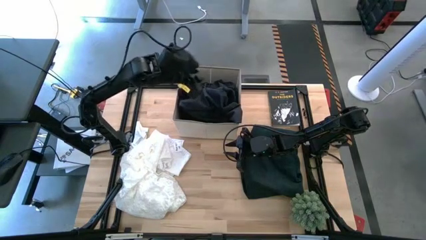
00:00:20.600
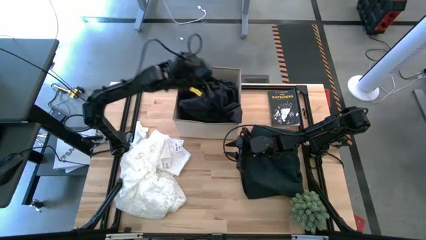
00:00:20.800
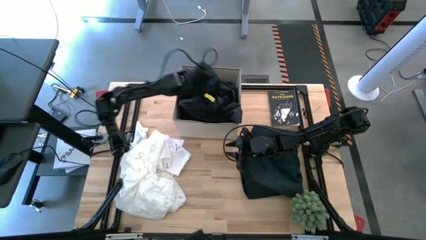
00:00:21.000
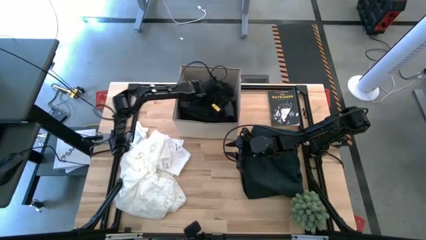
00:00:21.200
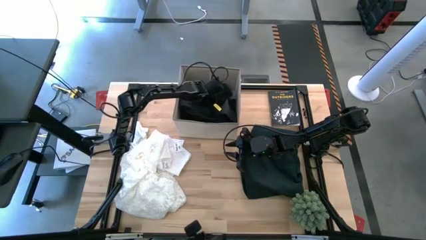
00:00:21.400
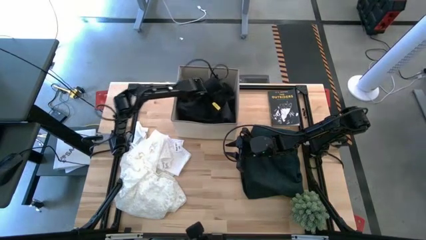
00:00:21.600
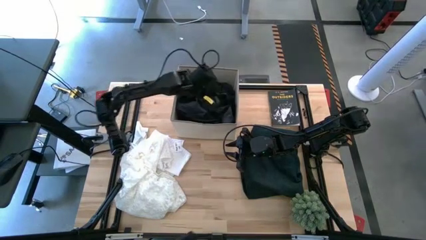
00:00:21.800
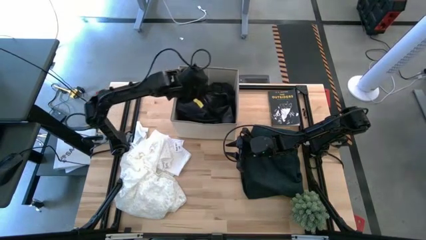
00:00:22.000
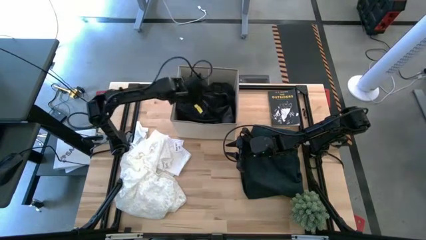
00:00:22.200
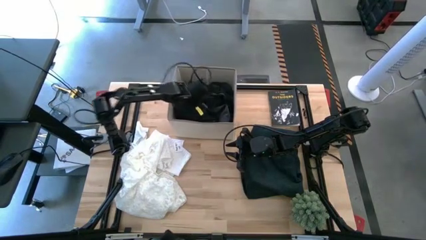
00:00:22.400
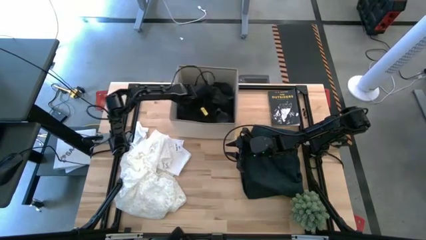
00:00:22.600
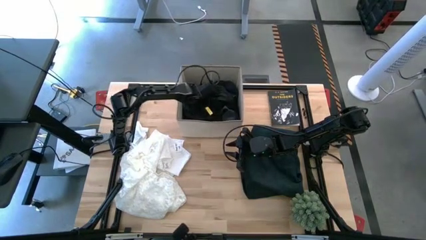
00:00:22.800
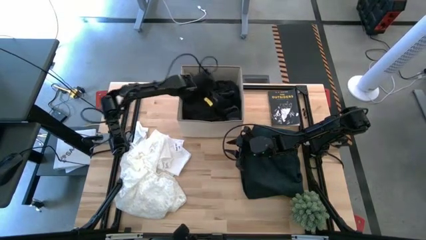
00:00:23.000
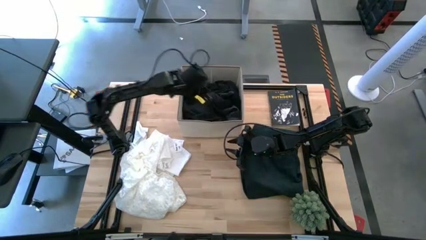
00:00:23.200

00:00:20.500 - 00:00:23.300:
Task: Sort clothes
Adjust the black pants in the laundry organizer

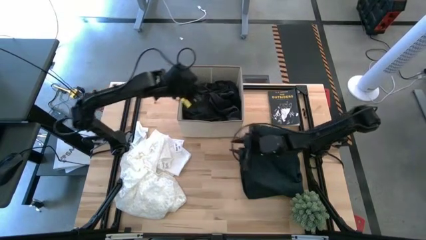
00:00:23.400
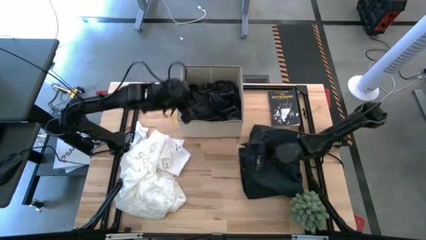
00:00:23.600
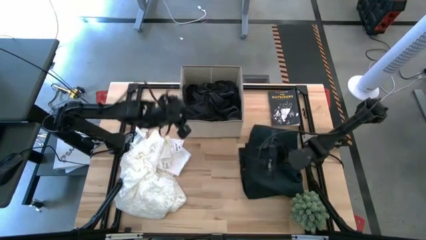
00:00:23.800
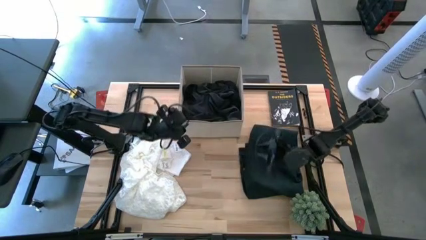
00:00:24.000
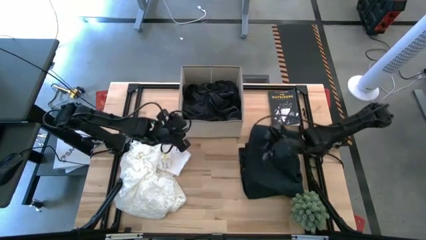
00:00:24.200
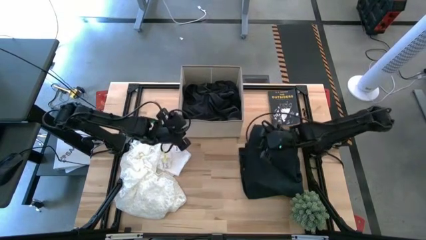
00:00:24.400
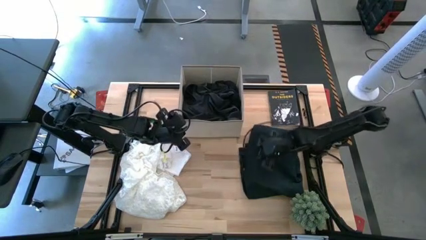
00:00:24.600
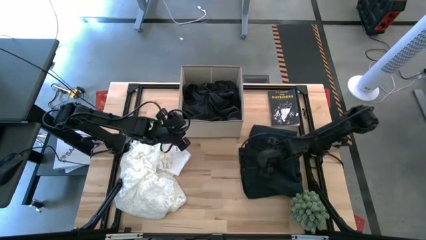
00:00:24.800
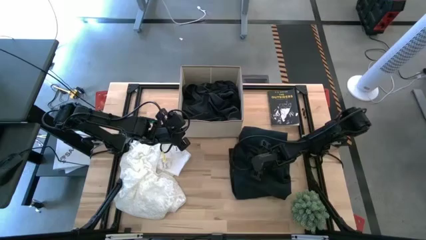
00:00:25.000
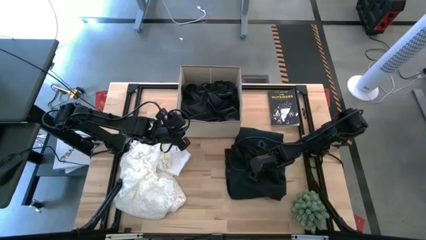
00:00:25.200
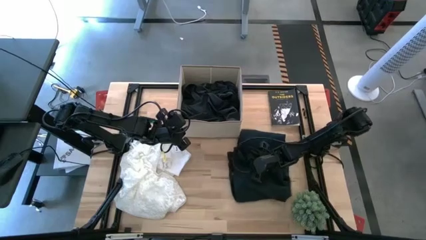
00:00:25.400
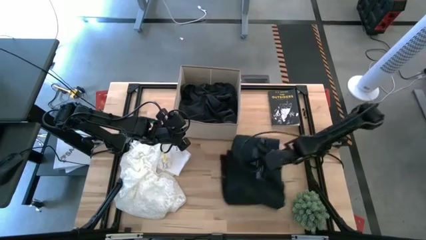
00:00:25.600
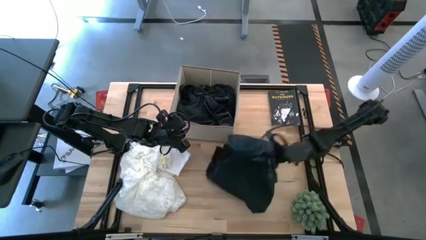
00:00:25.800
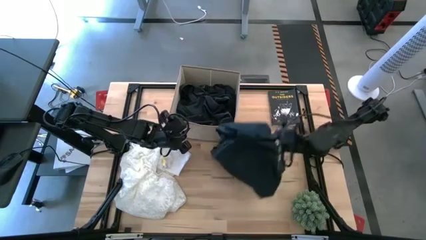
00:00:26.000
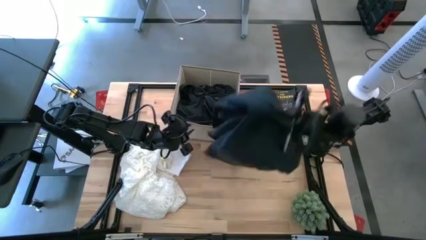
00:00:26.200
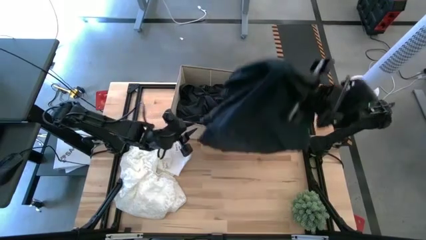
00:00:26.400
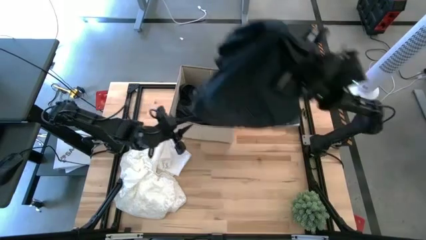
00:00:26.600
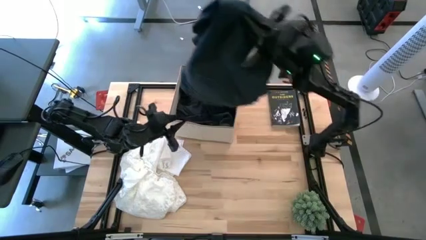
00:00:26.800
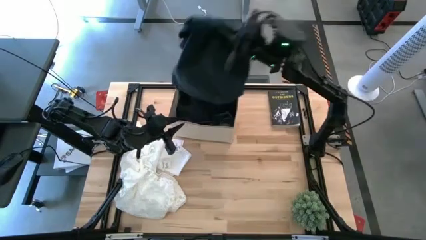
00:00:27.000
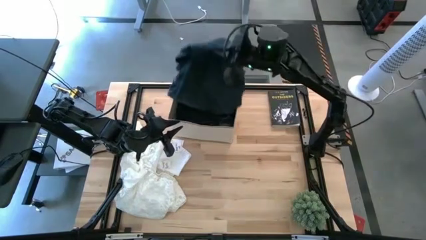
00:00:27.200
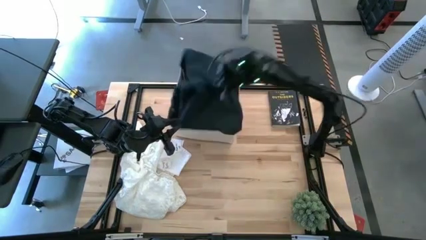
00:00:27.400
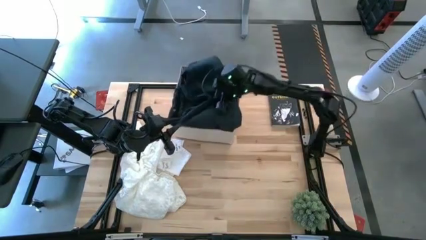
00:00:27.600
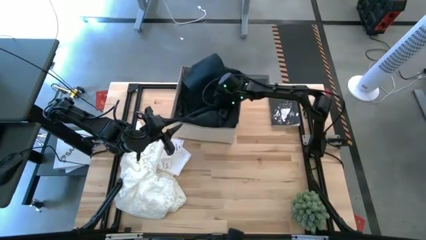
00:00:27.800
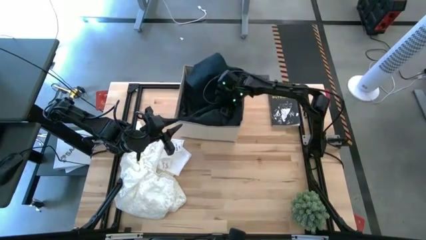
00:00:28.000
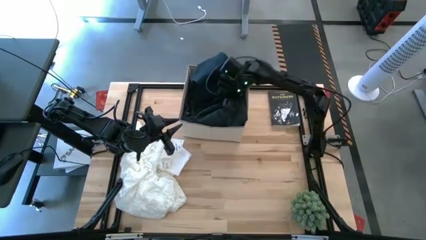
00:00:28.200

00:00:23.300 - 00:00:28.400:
Put the dark blue pants into the laundry organizer

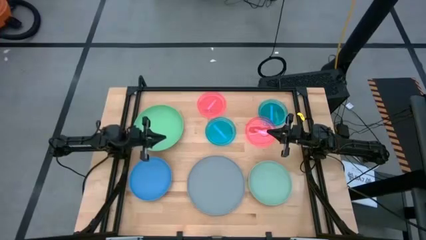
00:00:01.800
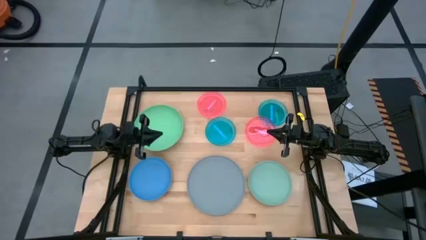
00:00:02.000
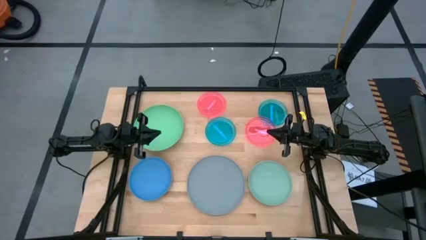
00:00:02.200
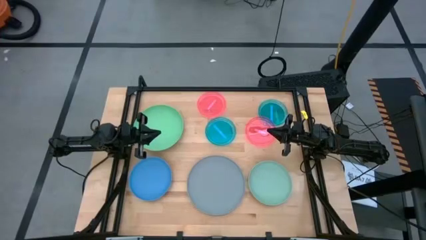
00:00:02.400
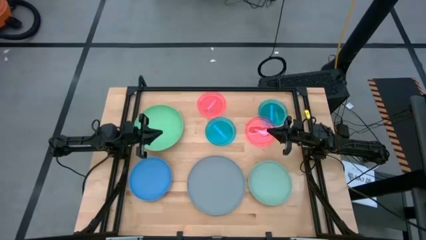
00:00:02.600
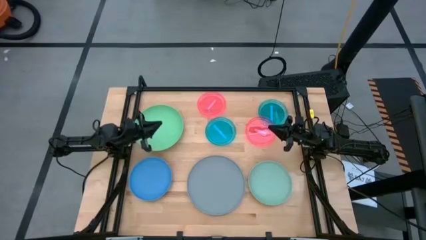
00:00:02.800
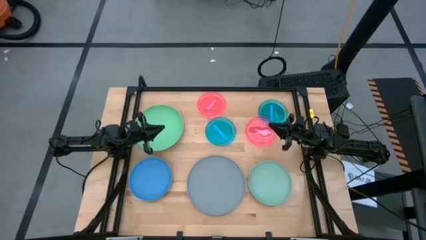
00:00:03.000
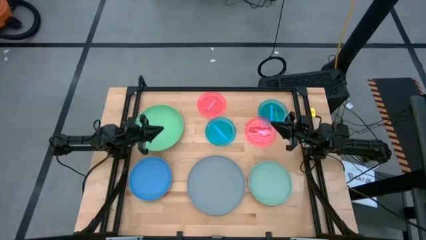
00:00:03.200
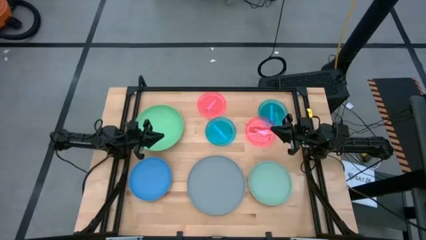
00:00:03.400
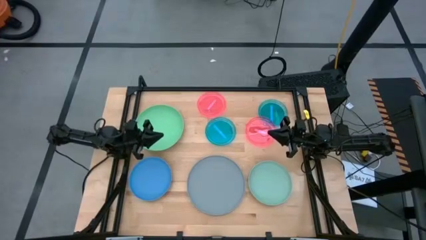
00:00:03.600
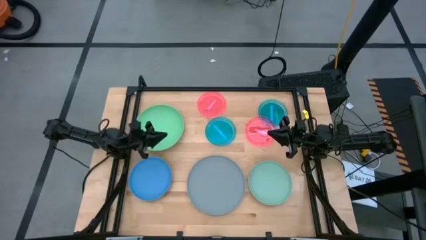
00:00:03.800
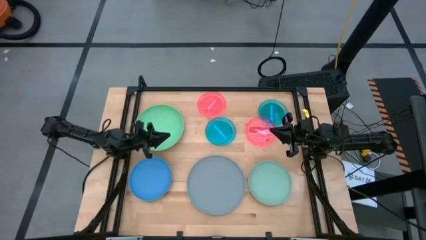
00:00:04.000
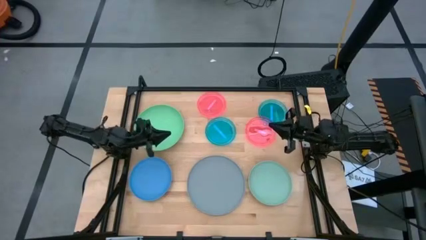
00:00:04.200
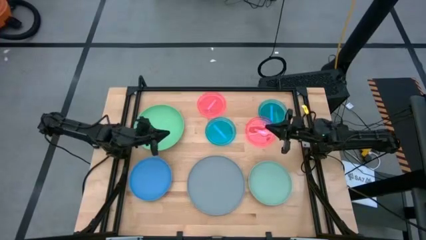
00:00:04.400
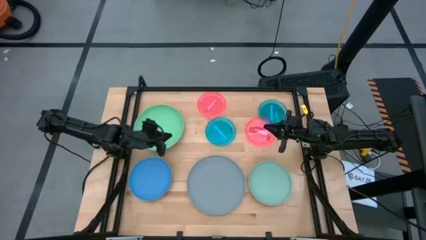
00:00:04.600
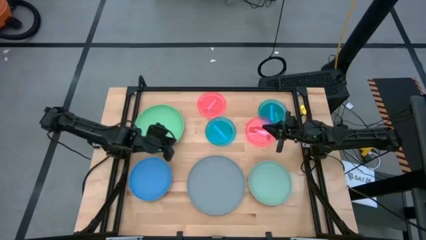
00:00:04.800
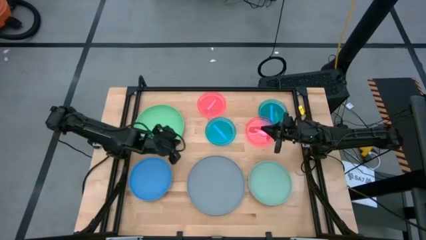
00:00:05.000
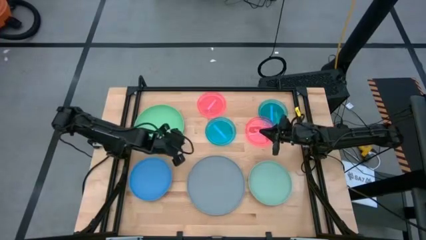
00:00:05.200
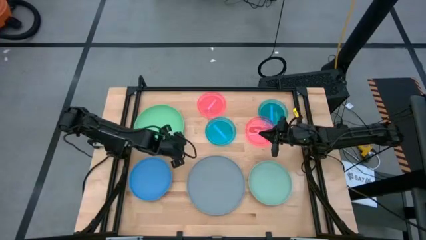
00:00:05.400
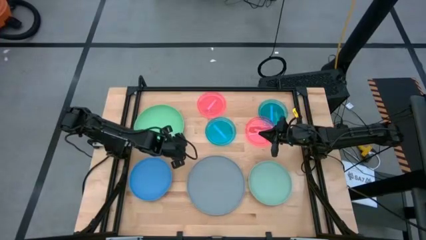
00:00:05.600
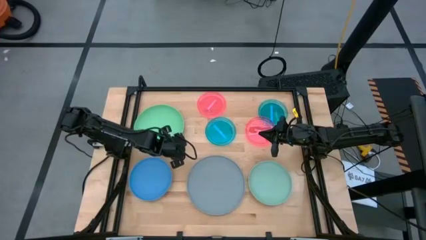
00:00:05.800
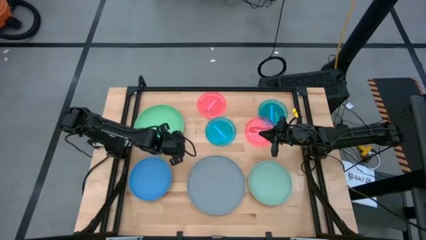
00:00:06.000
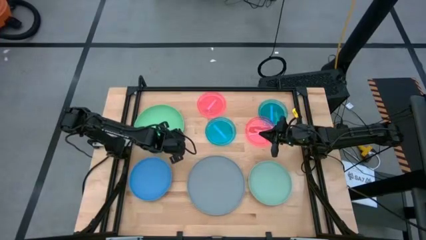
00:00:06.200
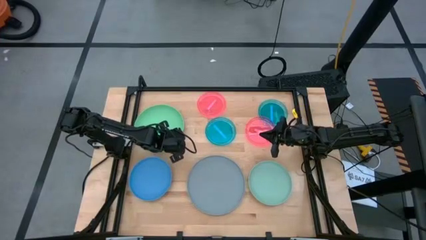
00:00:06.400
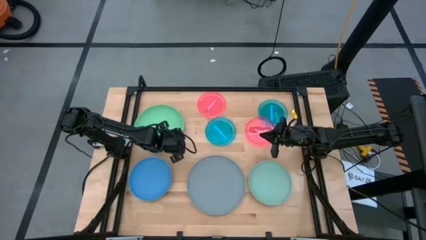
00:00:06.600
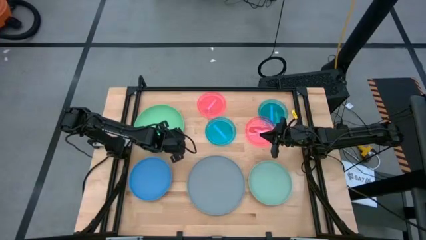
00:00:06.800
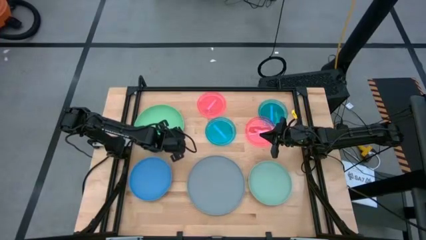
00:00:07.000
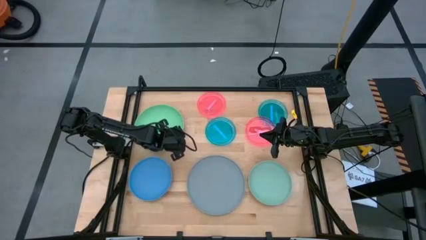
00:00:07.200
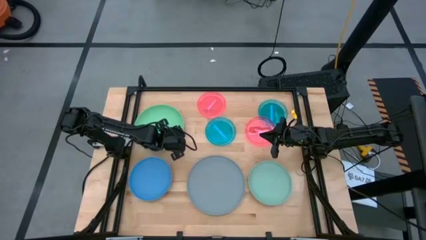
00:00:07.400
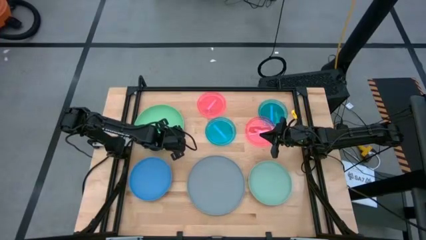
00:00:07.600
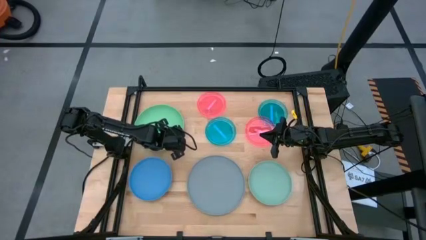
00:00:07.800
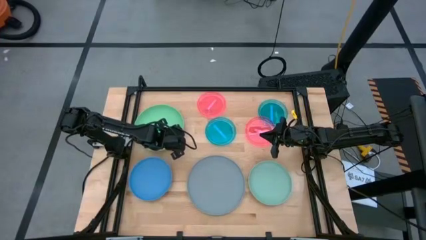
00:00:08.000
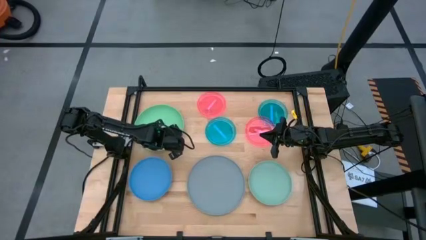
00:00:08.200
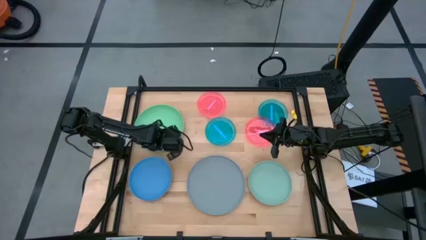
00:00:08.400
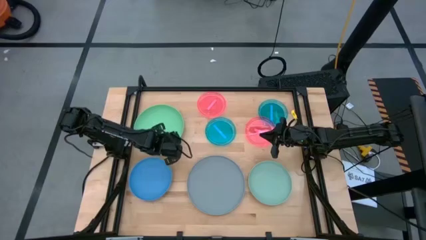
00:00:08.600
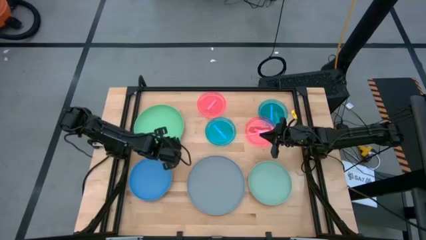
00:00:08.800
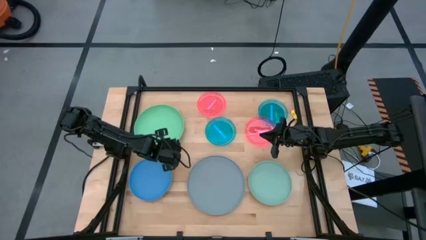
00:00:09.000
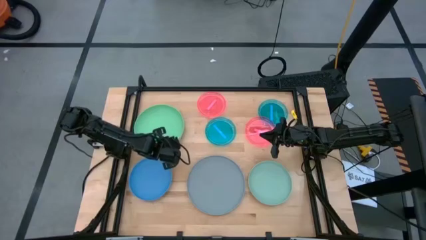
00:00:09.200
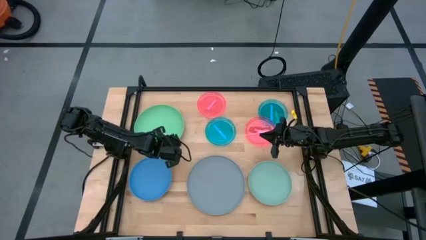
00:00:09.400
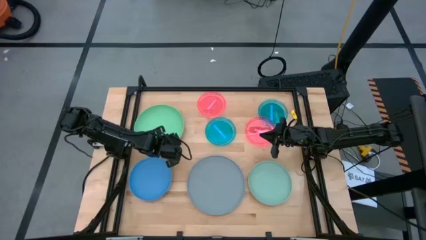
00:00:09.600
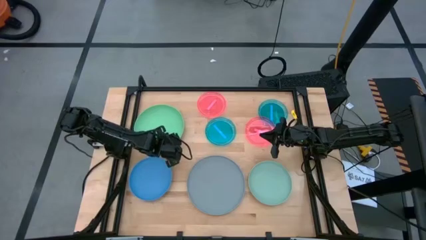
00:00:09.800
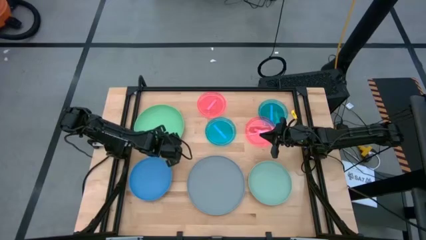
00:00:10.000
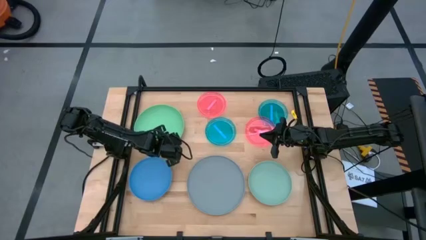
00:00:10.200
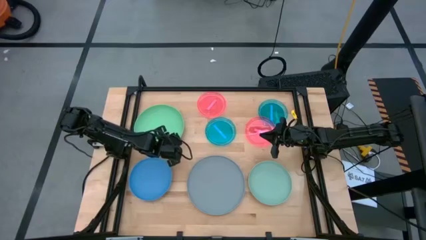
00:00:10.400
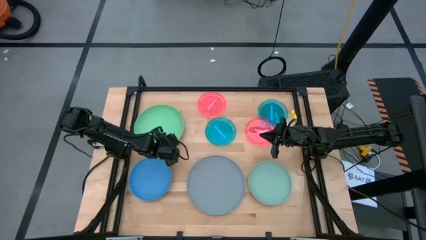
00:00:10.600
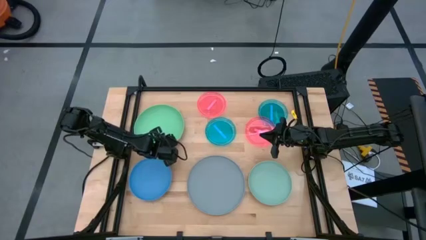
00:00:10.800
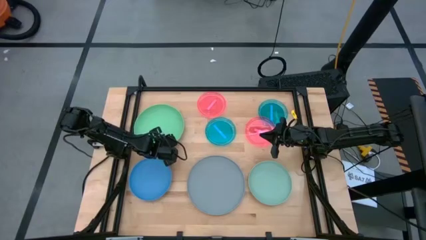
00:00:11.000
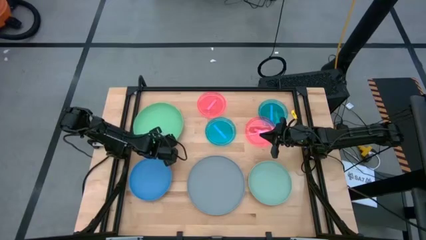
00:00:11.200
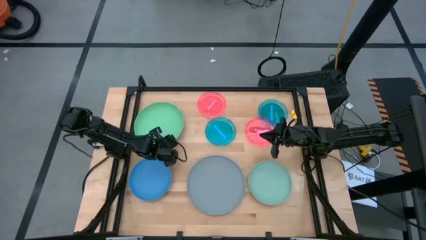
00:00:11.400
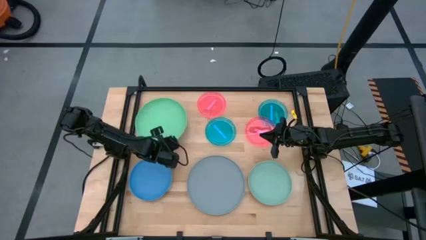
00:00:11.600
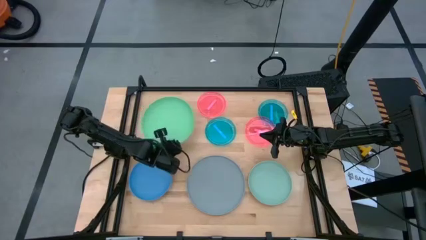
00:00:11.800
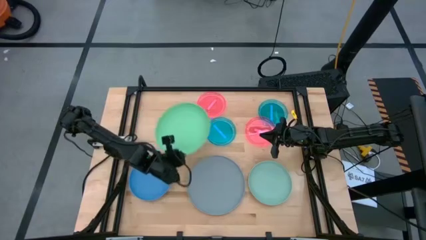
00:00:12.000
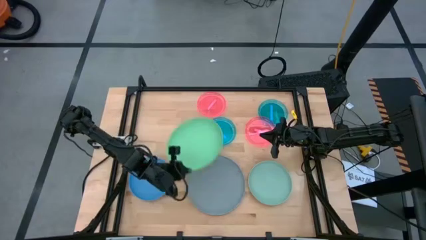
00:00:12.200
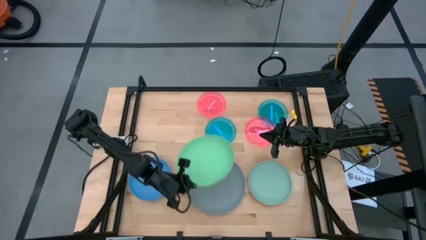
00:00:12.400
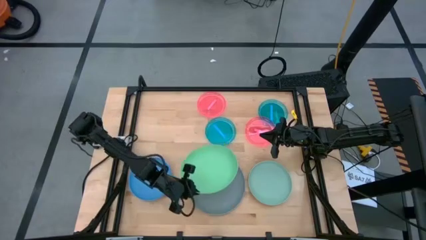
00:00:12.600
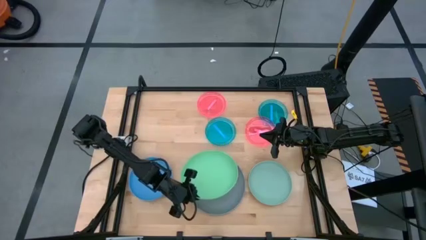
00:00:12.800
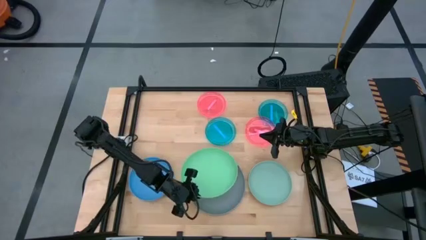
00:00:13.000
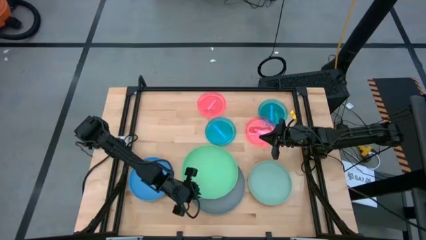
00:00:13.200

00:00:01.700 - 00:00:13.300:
Task: Stack plastic plates
Stack the light green plate on top of the gray plate
